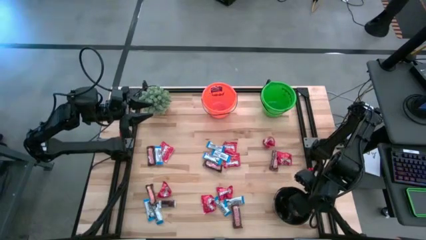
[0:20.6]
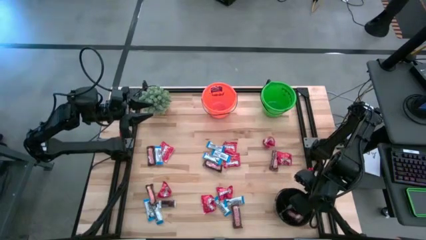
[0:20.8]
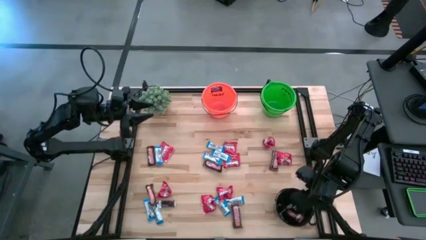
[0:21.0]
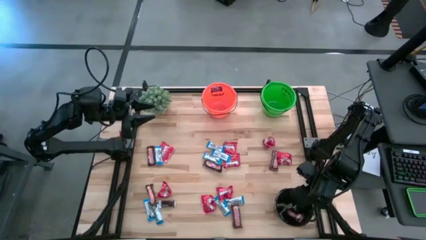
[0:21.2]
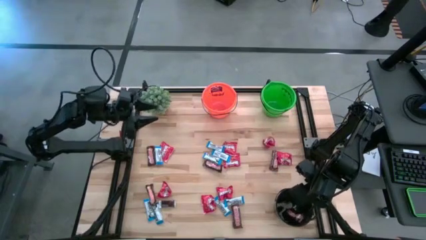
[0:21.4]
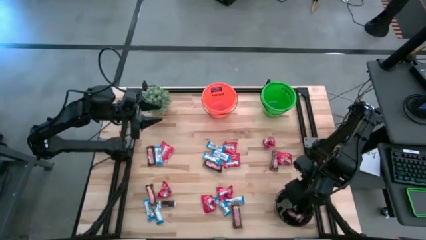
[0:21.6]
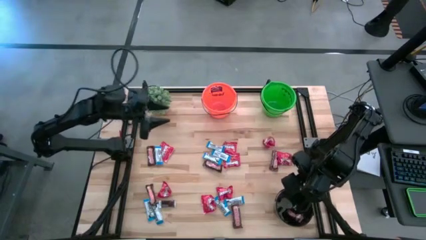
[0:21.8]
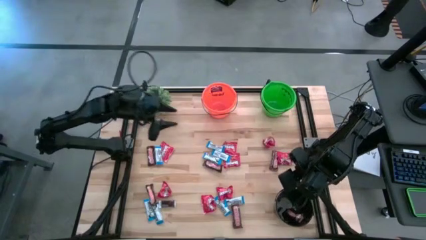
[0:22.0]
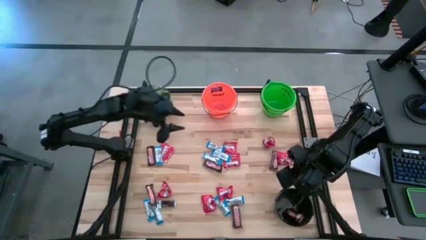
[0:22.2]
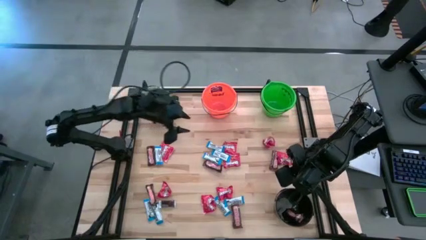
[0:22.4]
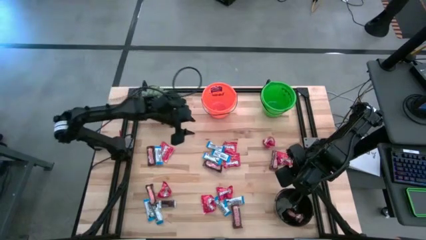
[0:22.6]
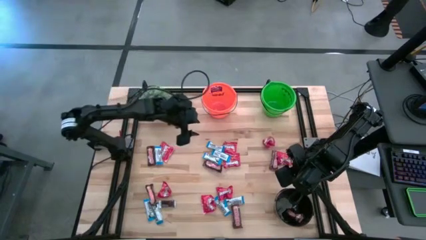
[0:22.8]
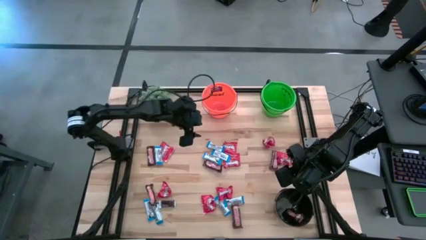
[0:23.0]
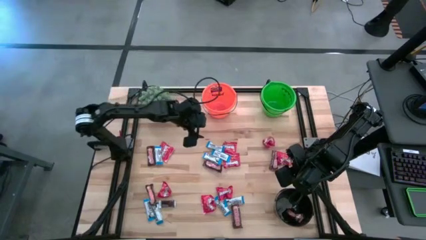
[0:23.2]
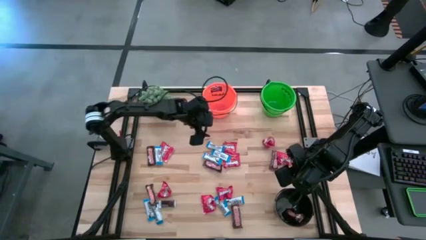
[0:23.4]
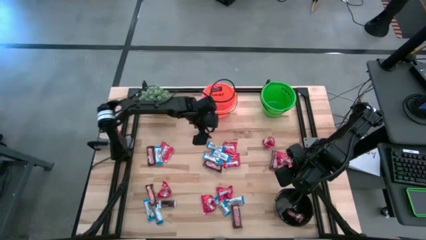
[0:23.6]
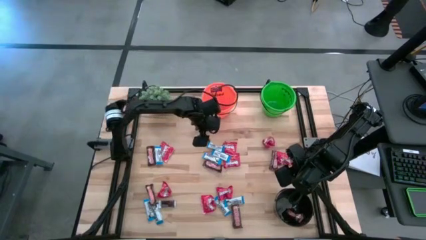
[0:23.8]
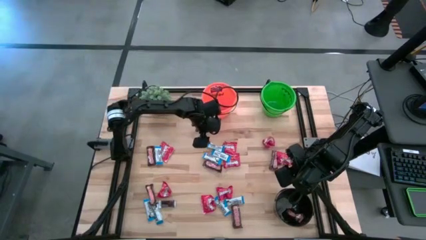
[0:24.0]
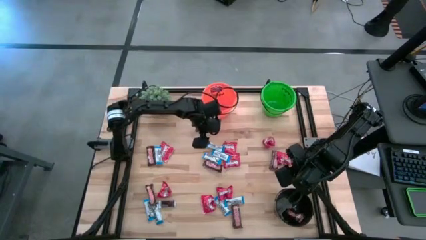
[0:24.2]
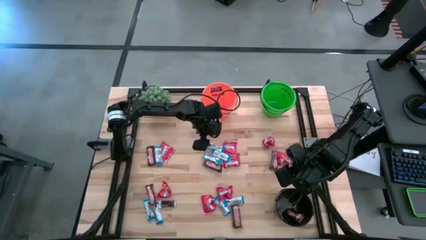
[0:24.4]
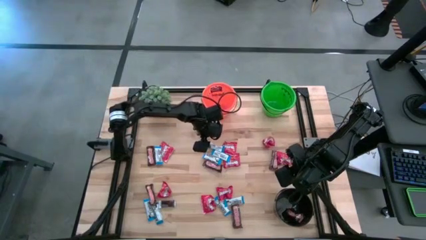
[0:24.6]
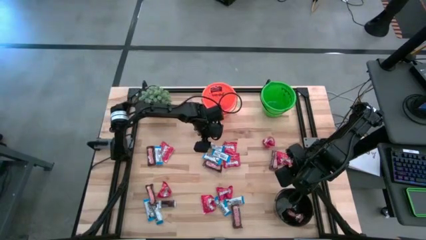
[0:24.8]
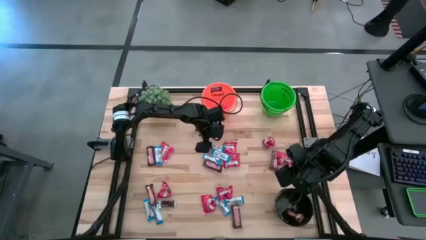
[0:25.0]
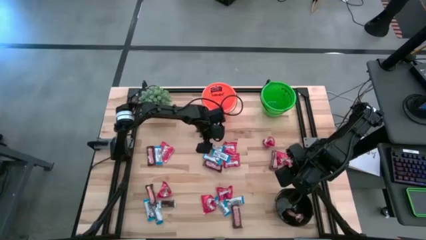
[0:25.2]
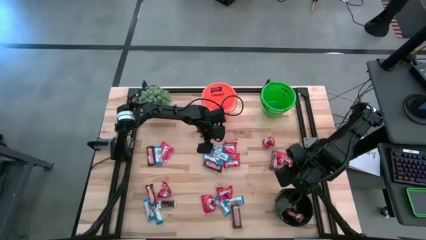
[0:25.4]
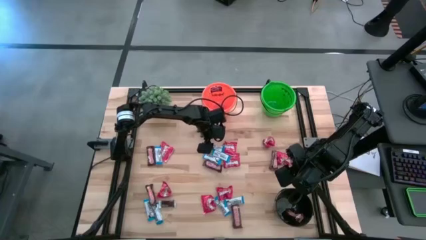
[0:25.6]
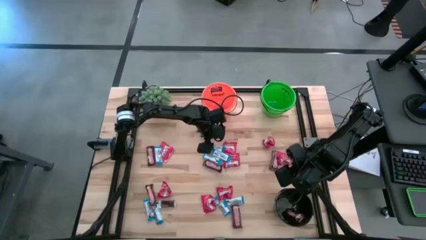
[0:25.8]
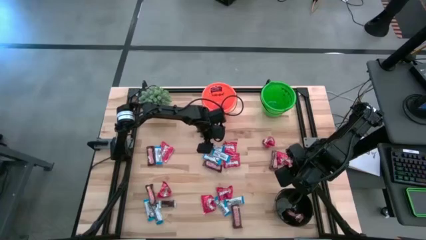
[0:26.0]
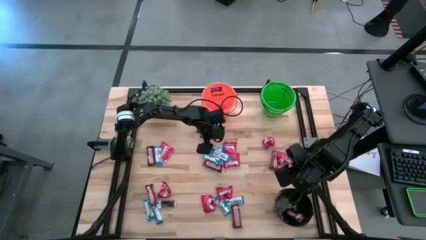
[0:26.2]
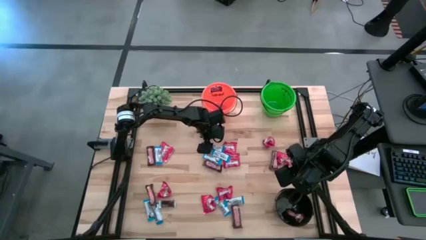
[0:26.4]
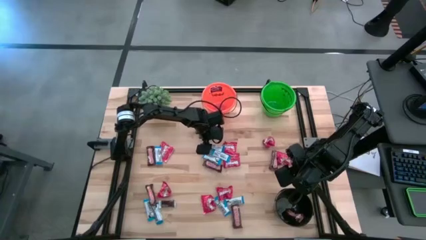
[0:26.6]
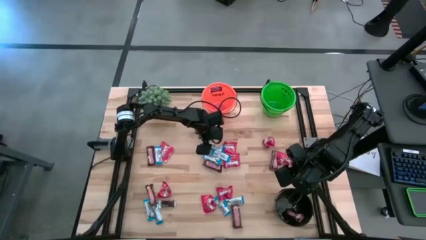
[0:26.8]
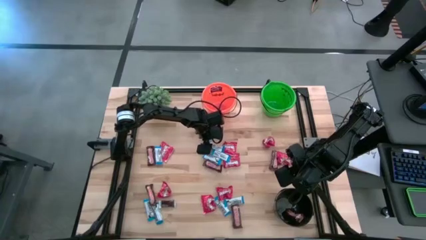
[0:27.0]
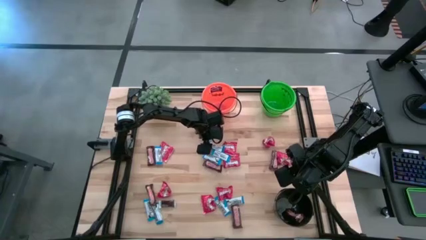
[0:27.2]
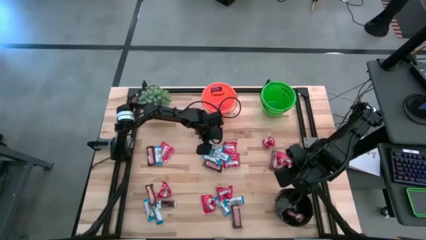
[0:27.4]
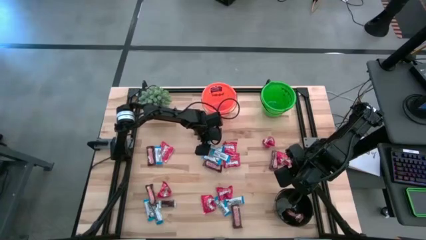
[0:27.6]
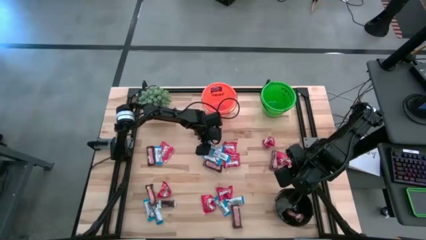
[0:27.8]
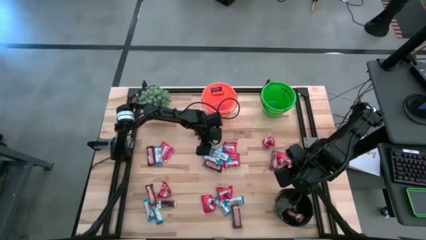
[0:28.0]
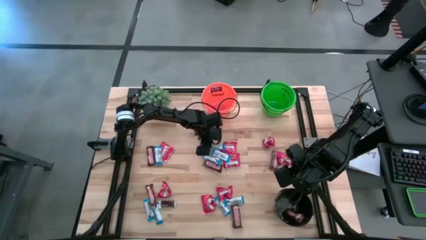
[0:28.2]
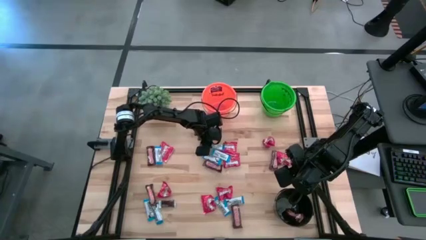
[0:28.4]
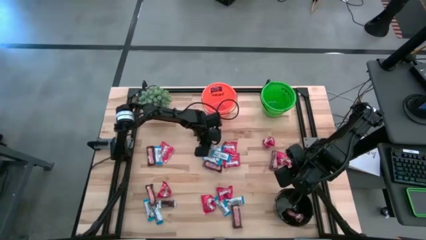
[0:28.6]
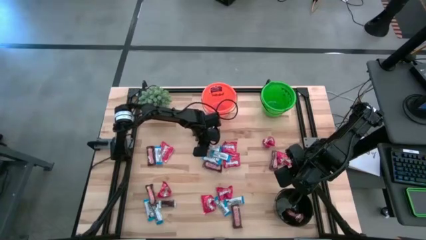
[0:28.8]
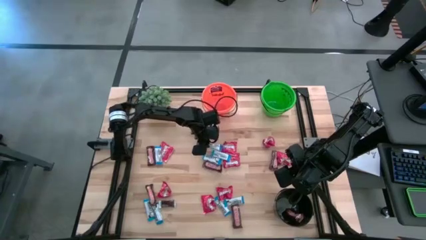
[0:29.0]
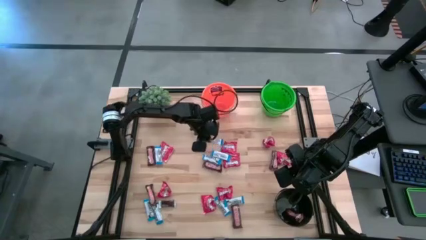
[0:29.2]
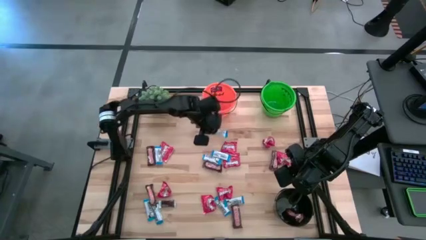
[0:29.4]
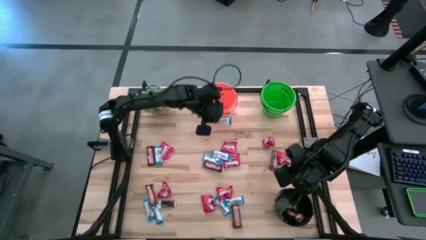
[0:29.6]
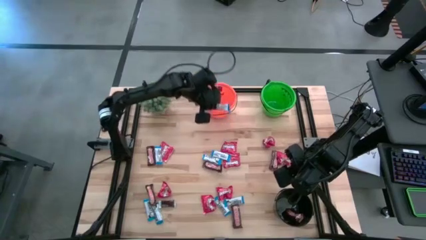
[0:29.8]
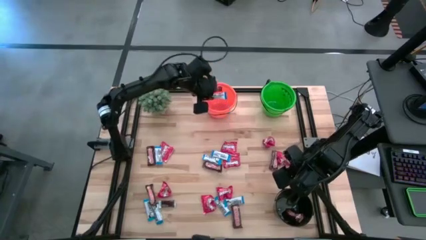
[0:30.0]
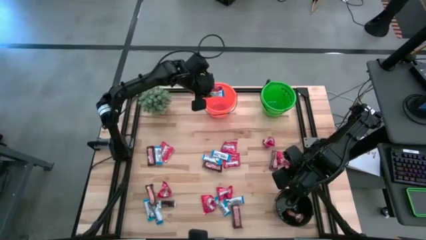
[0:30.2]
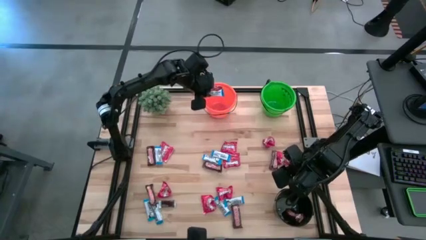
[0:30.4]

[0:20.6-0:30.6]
Task: Organize candy in baskets
Put the white chocolate bar into the orange bucket
